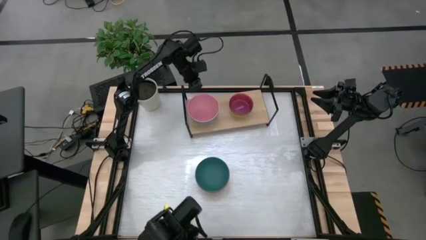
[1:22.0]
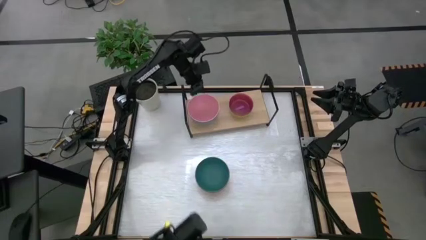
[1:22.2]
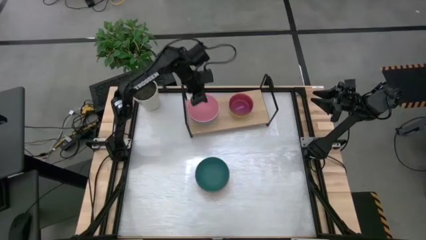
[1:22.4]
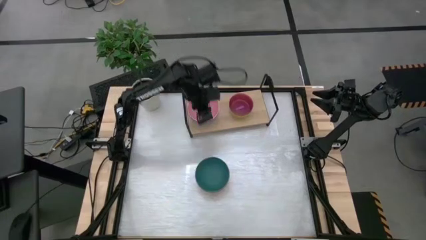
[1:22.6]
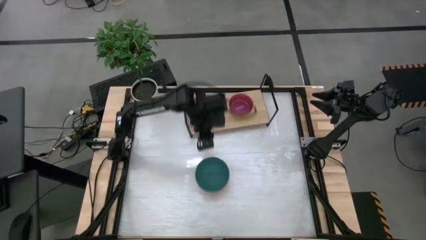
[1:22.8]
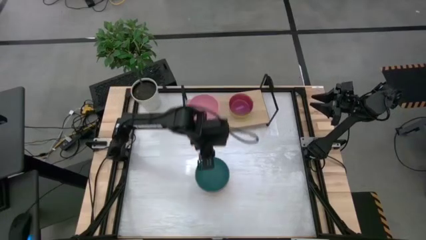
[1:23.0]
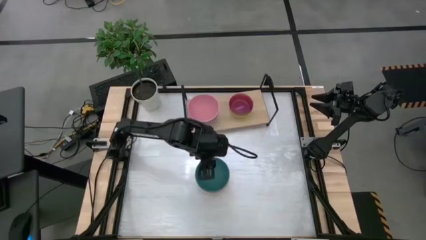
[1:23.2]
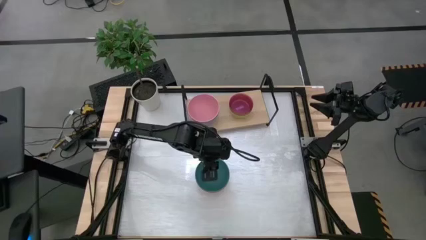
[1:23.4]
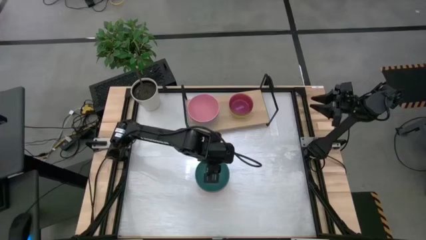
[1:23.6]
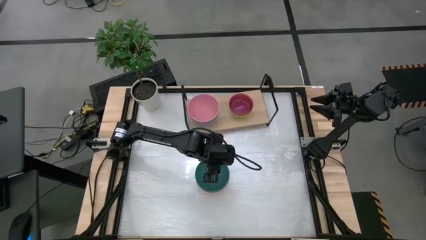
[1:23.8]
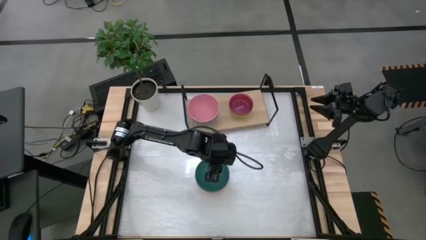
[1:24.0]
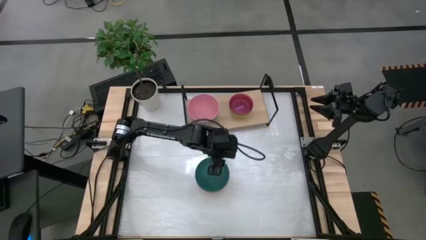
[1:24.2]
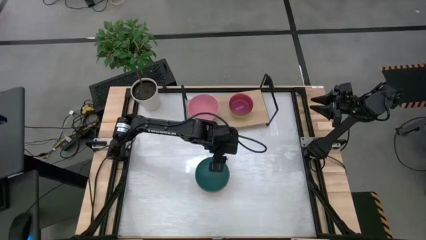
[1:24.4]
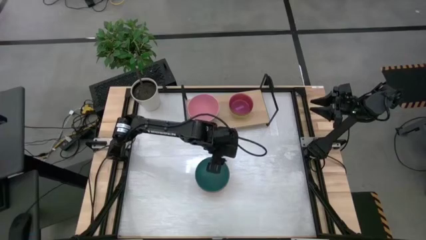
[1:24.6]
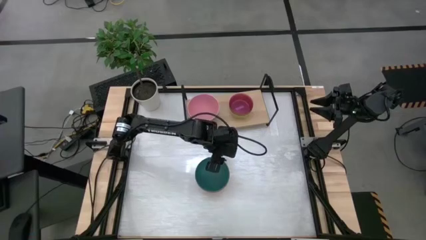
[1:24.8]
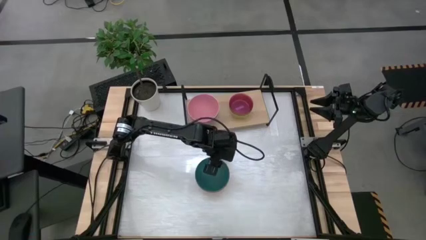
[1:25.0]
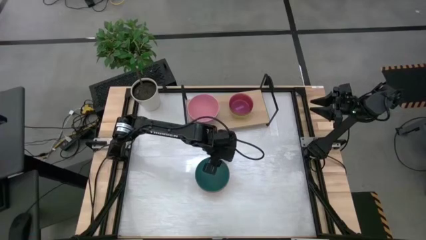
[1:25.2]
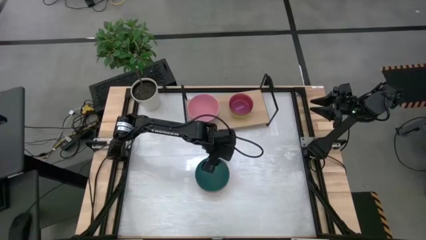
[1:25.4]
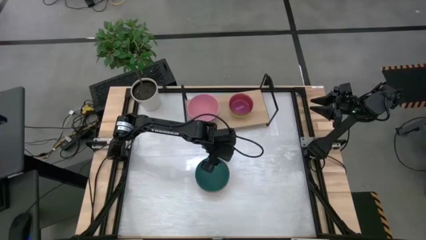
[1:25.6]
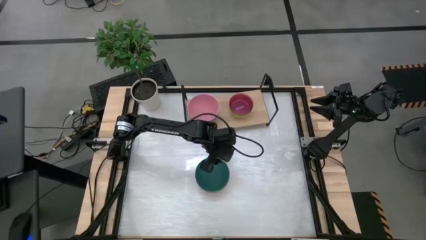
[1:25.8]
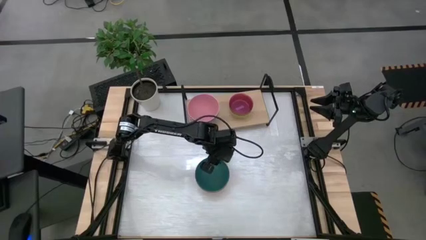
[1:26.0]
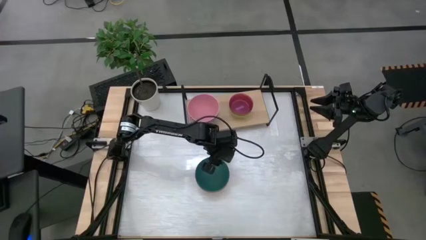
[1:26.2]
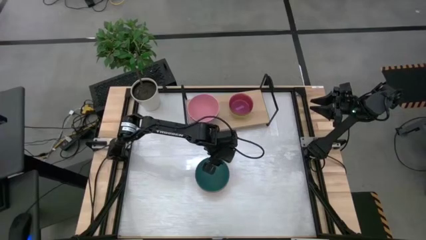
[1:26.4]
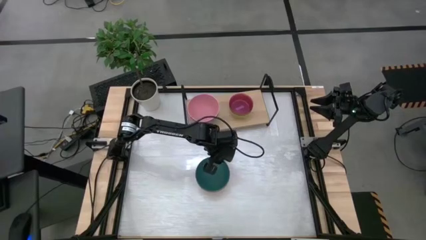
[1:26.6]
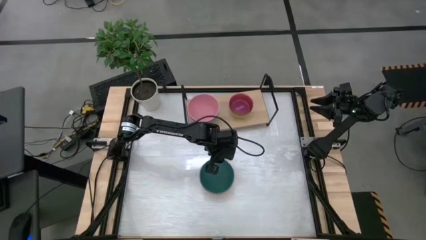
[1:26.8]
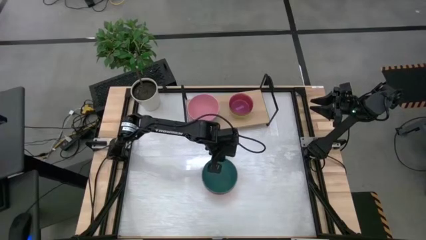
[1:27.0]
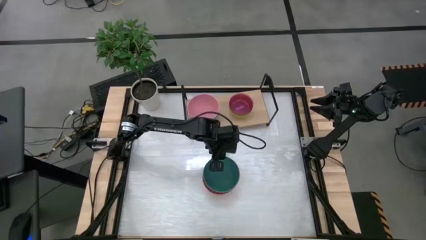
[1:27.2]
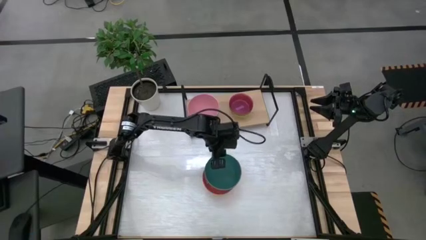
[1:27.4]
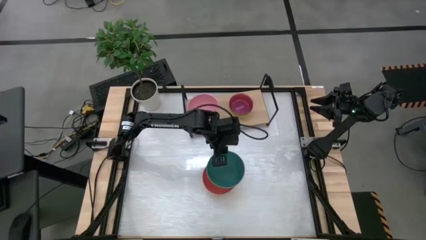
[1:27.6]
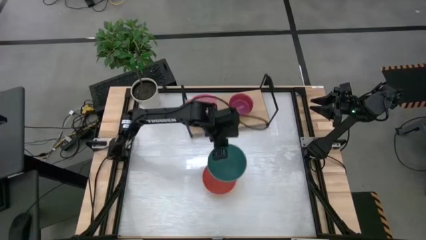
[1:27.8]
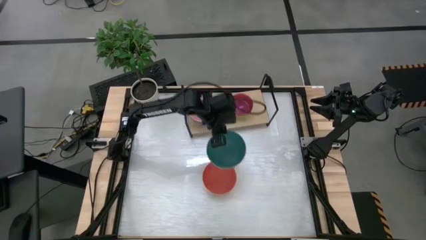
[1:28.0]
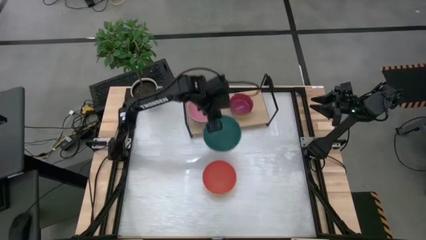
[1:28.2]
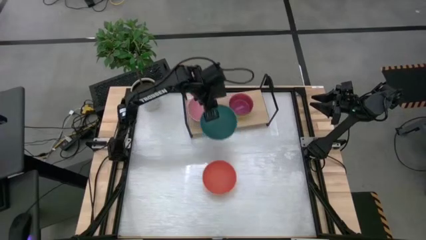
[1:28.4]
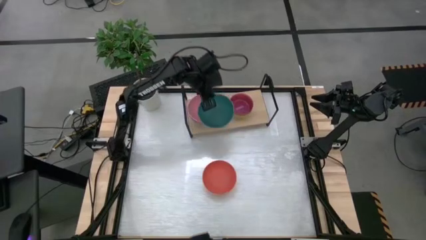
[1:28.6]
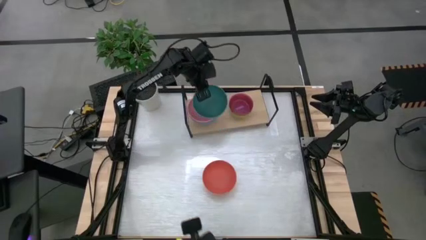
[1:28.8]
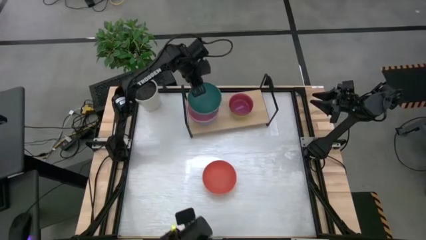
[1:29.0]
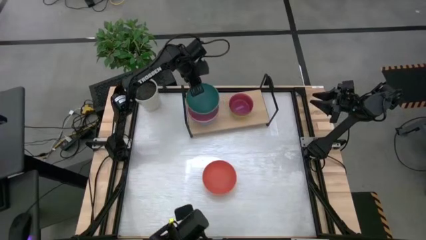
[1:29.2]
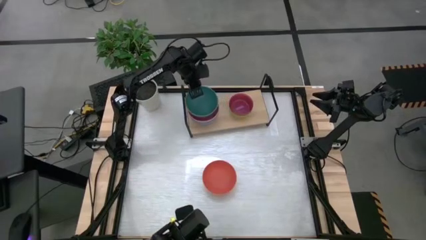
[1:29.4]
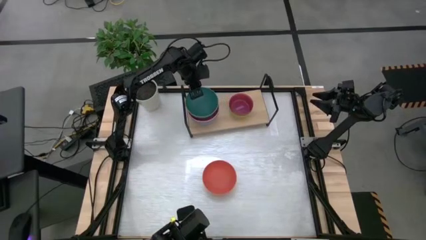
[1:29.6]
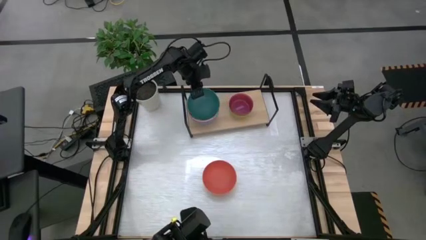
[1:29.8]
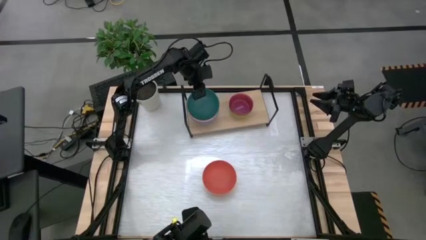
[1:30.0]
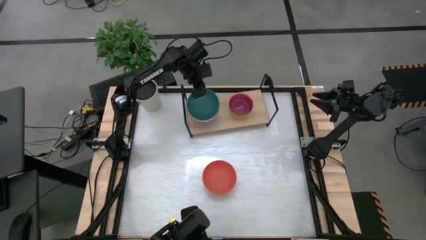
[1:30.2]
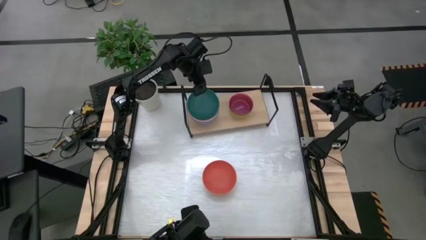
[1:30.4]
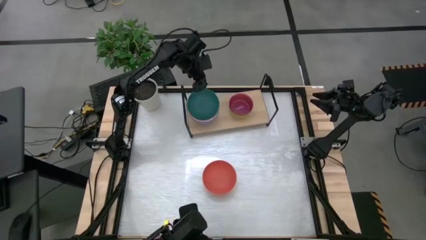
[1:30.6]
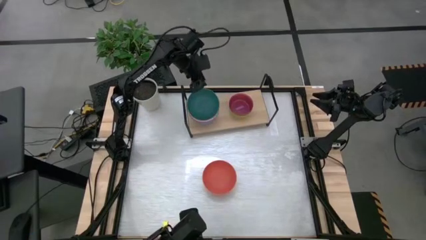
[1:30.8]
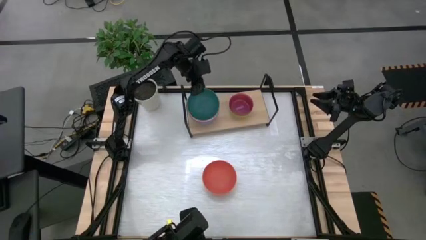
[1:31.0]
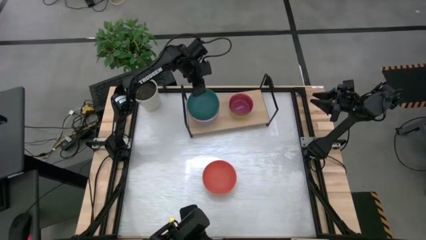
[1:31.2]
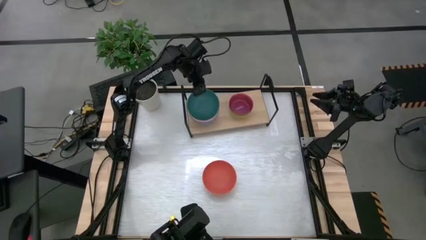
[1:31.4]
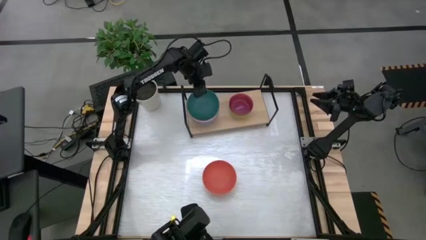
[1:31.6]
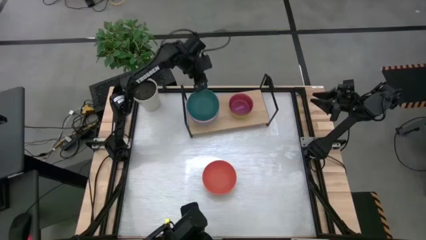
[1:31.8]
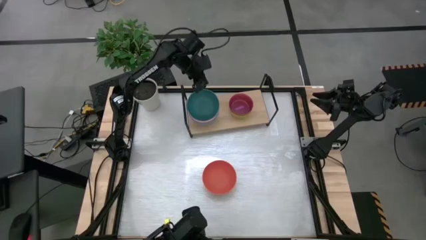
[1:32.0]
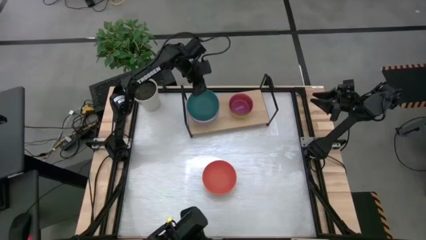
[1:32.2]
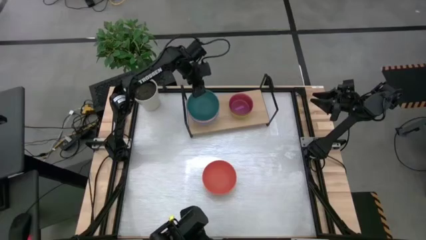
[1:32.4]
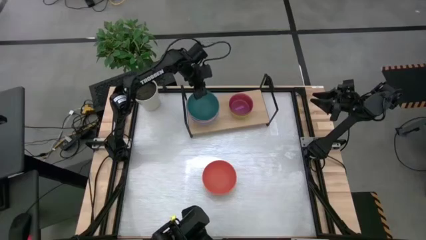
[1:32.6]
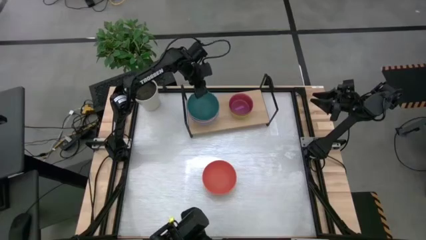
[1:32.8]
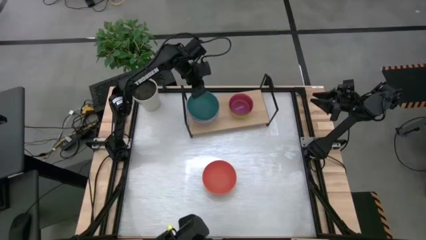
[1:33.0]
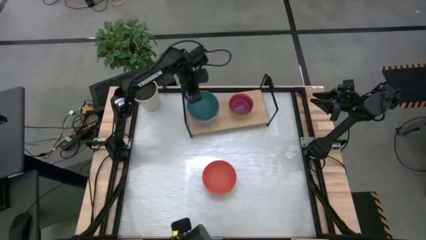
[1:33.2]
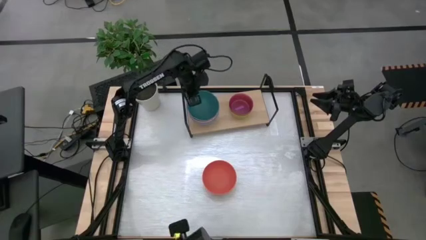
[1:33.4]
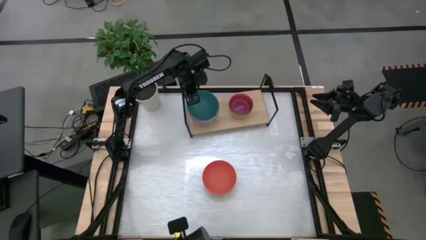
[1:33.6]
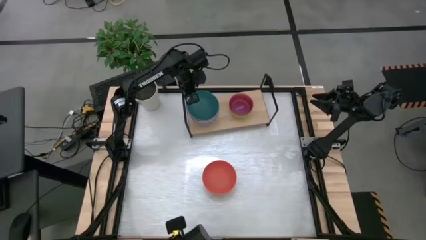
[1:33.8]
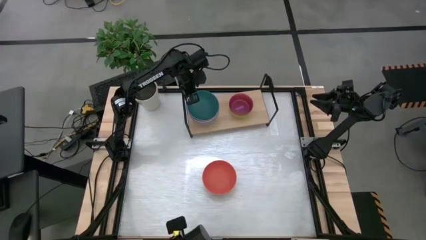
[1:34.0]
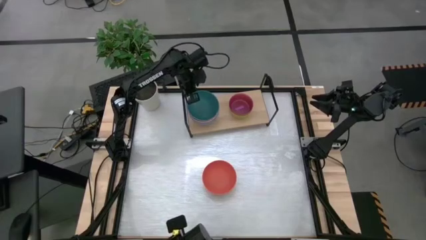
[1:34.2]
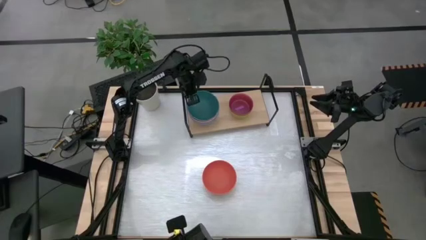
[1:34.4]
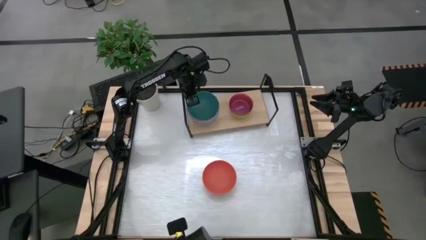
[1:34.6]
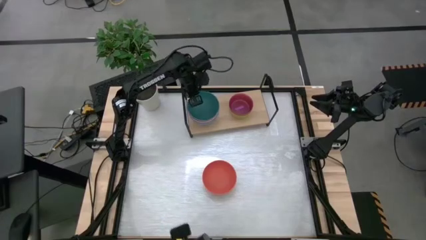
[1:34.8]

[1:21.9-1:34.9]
Task: Place and stack bowls onto a shelf
Stack the big green bowl on top of the big pink bowl on the shelf
